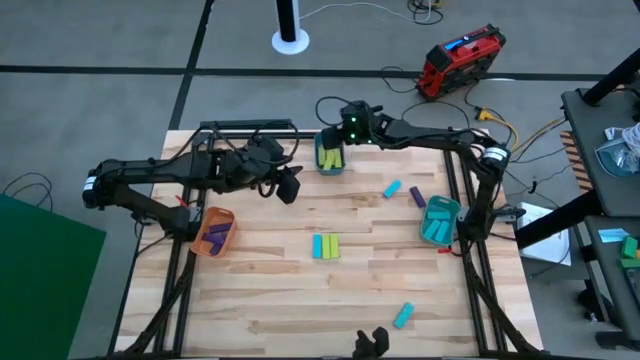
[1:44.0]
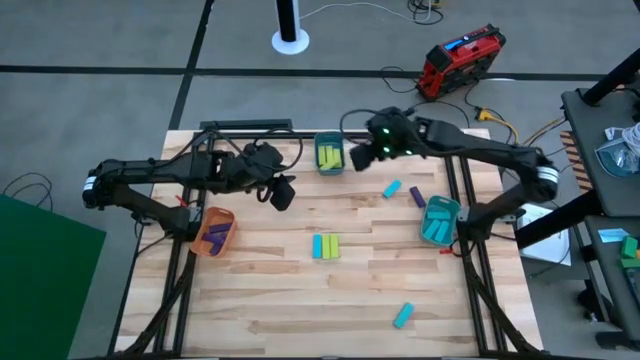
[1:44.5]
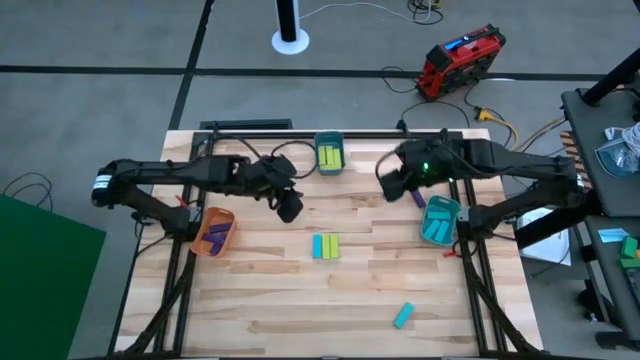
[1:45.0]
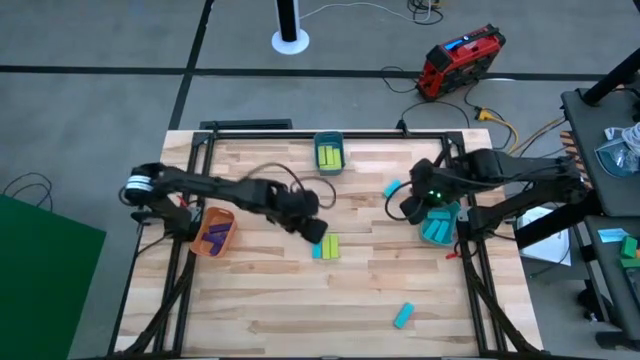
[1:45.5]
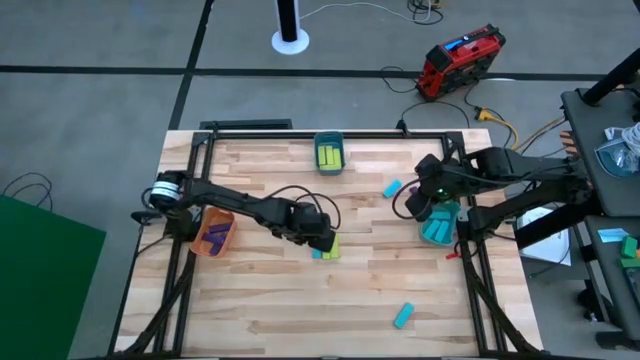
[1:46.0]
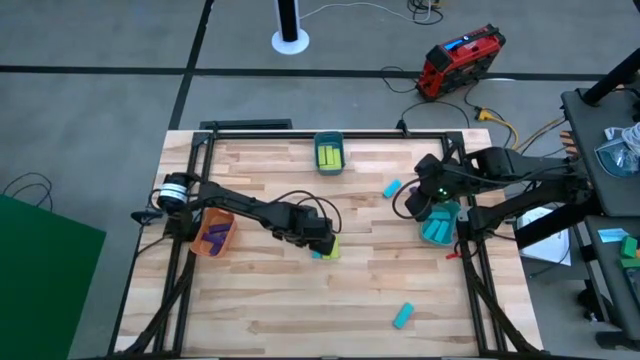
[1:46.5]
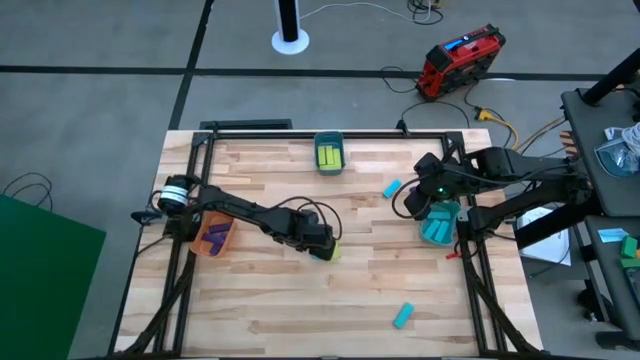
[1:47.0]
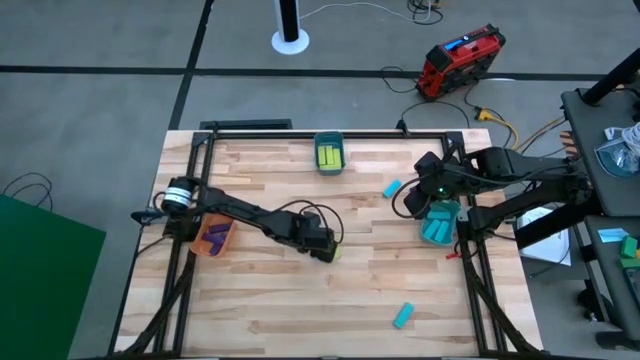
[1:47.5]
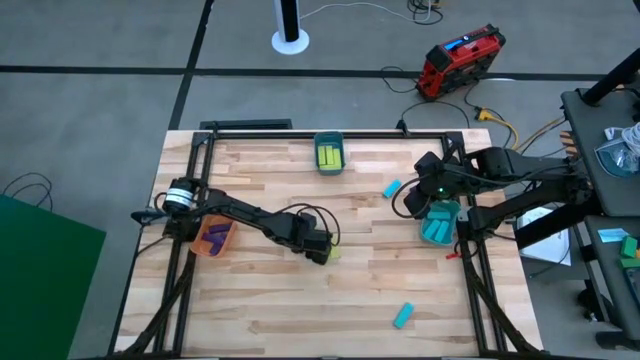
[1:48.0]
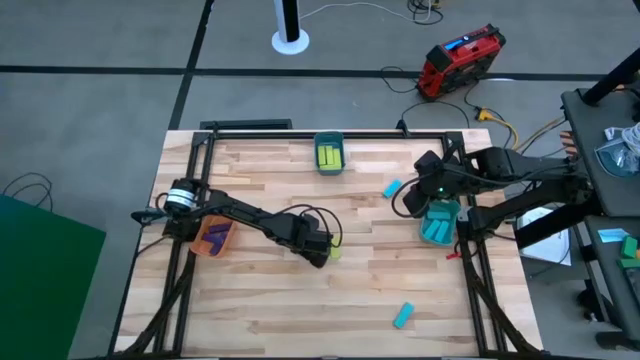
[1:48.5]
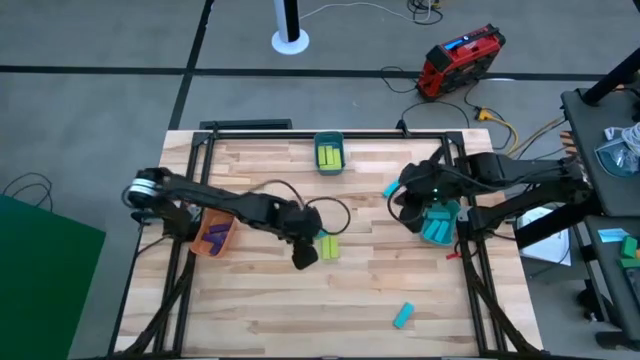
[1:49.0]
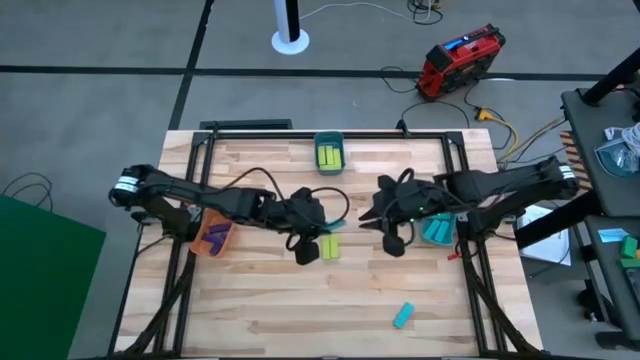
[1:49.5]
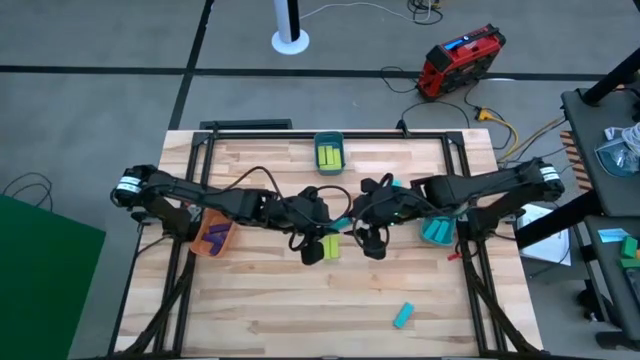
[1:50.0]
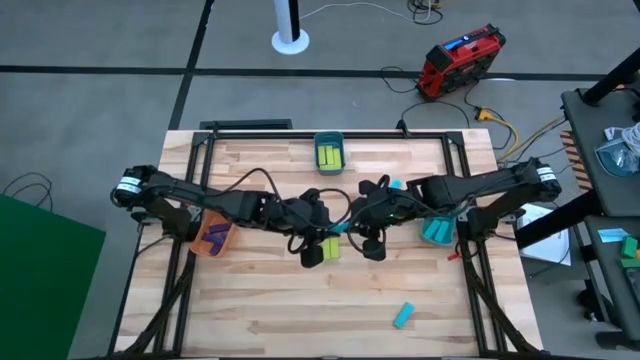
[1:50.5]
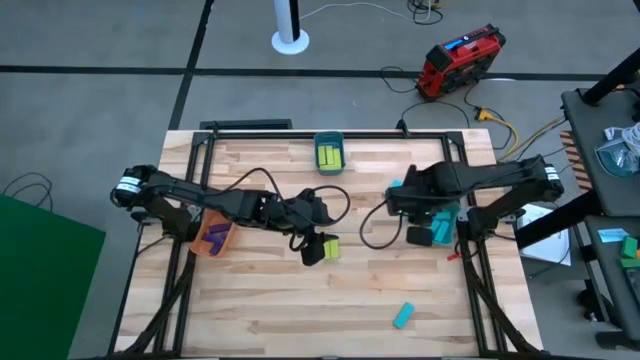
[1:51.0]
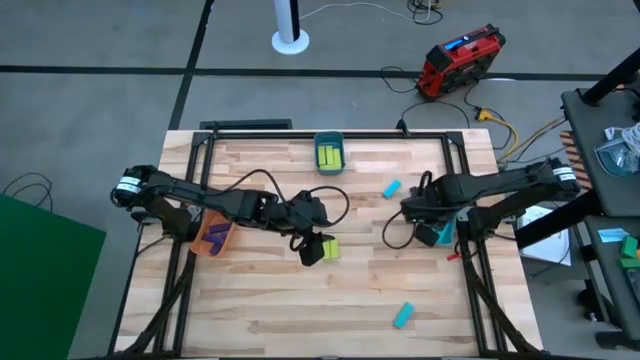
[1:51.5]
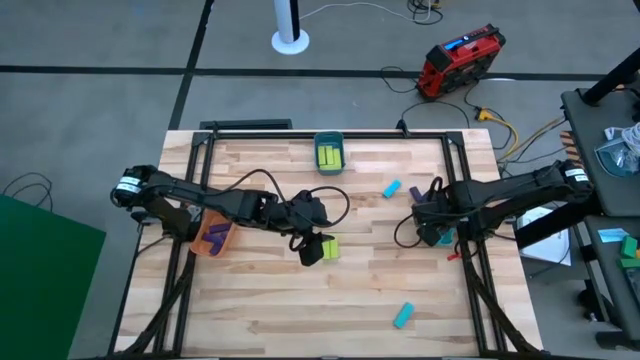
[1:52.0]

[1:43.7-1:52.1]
Task: Sort blocks
Put the blue block into the light blue bin

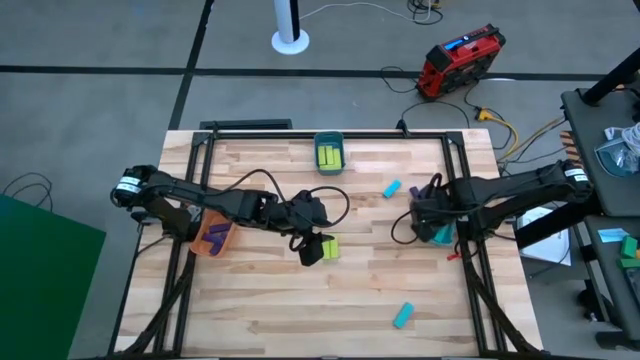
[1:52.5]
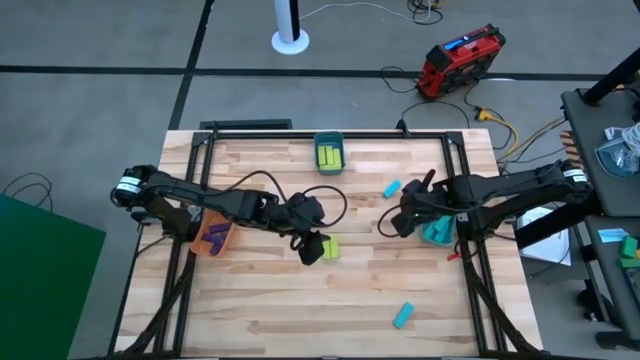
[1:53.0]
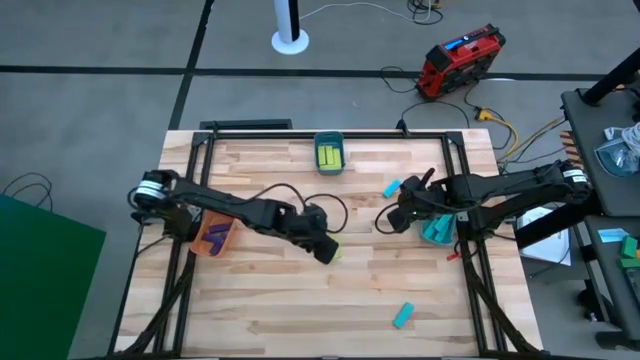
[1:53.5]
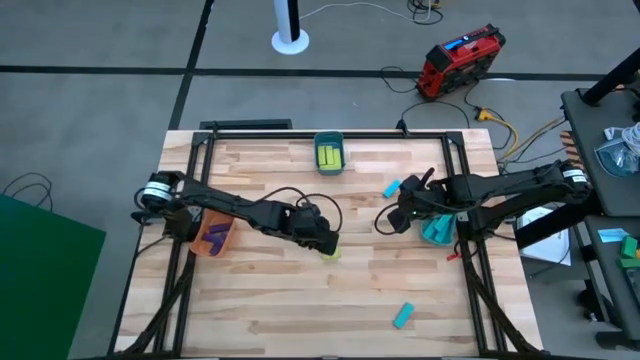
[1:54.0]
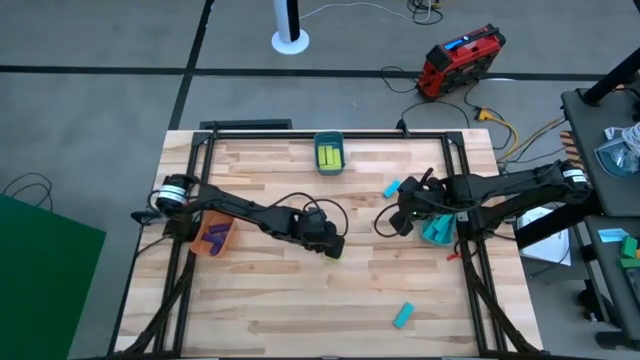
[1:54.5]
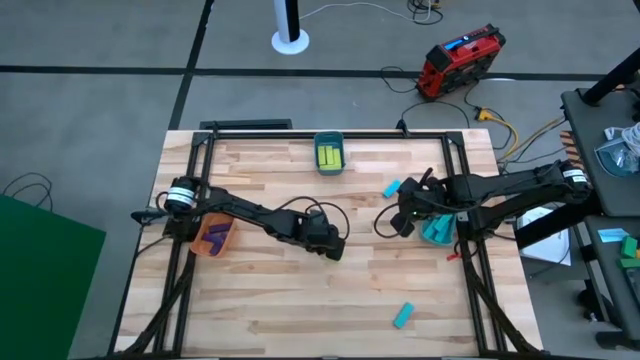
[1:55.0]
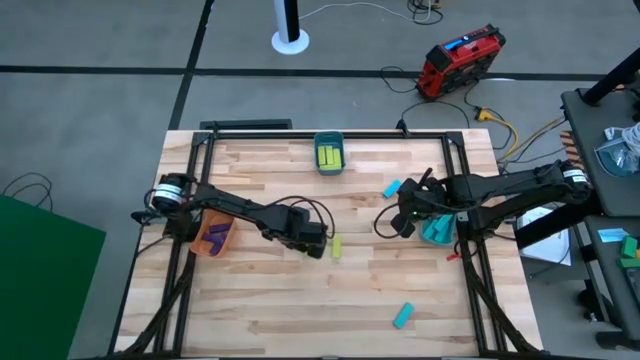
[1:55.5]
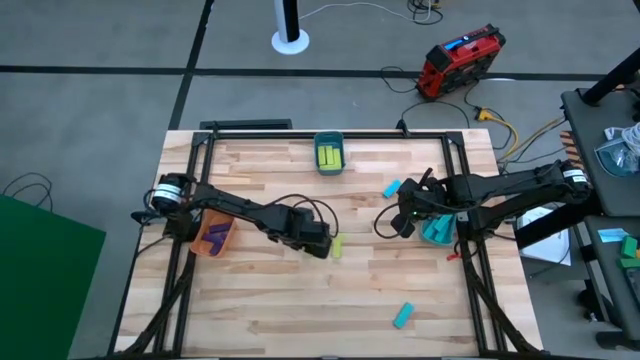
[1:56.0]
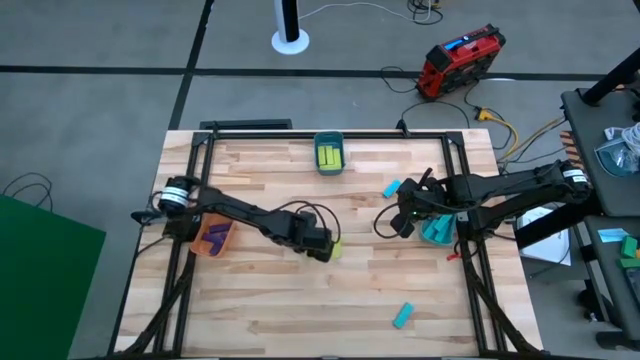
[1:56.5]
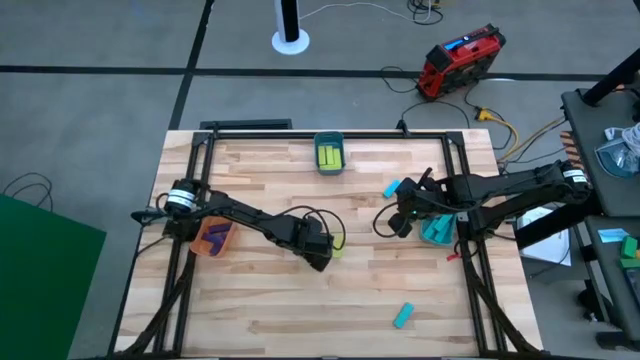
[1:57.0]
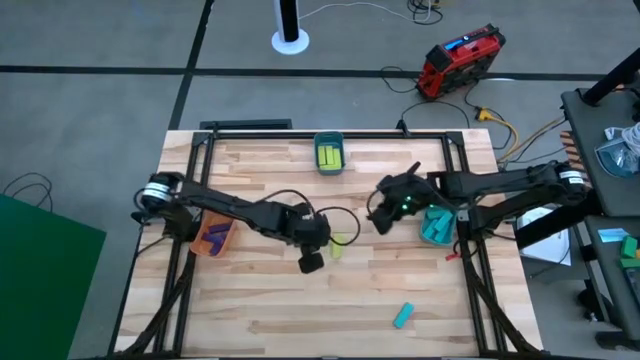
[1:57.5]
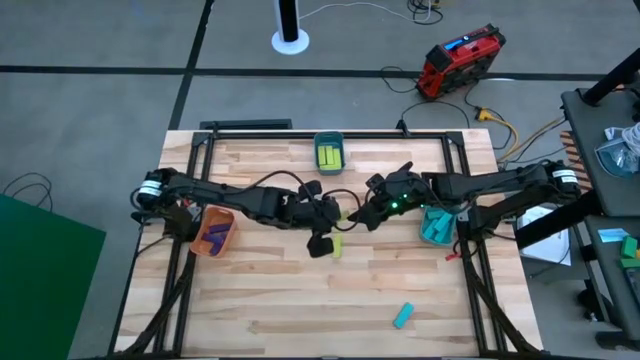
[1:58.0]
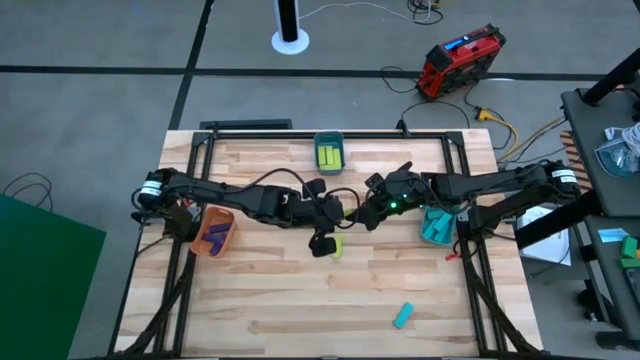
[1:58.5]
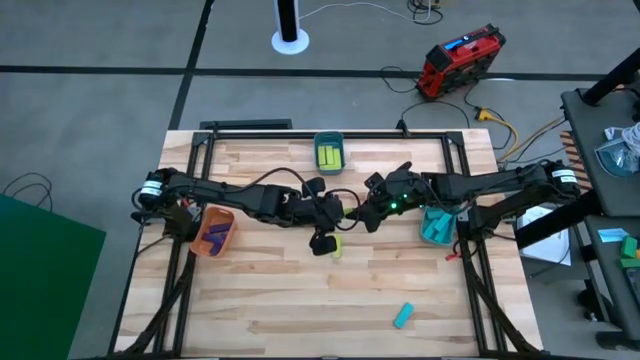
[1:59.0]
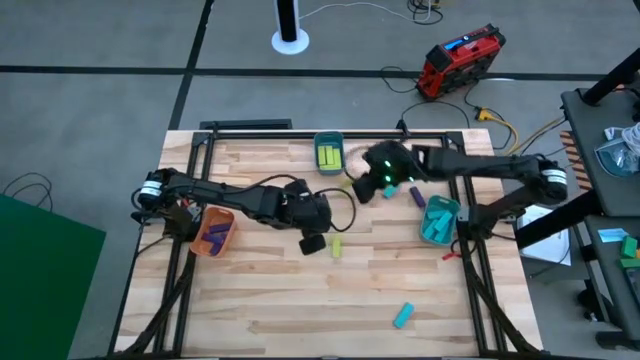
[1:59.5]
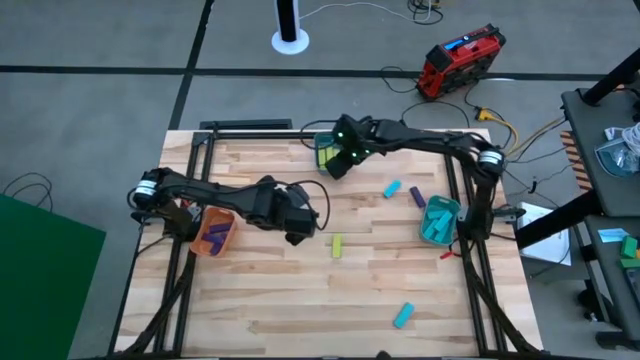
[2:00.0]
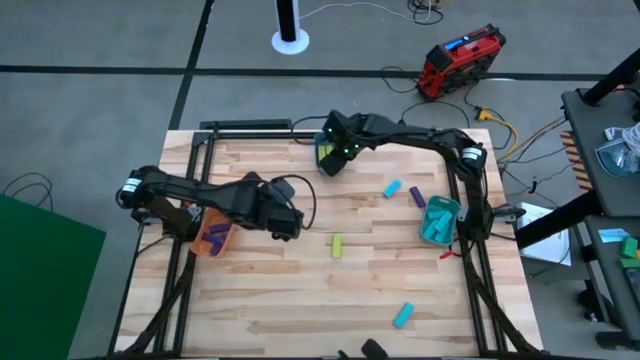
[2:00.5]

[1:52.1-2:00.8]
Put the green block into the blue bin

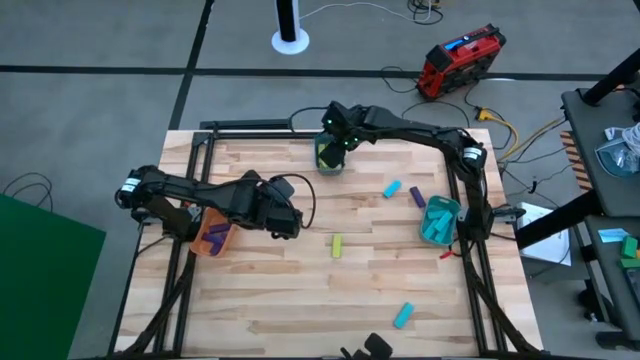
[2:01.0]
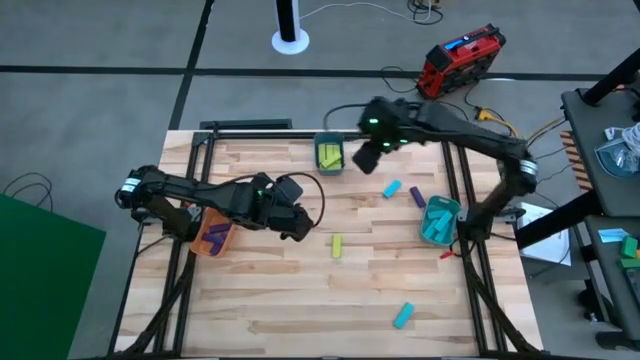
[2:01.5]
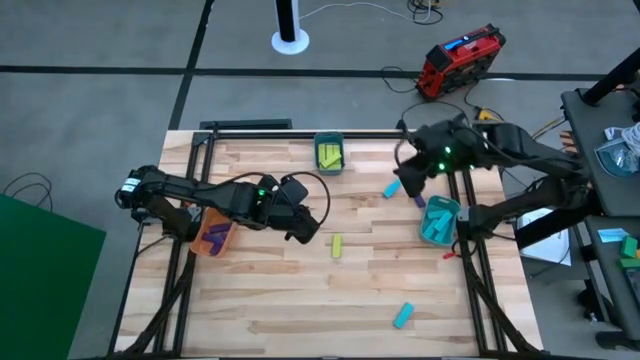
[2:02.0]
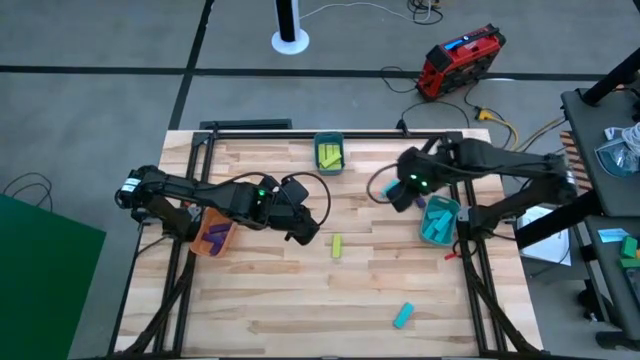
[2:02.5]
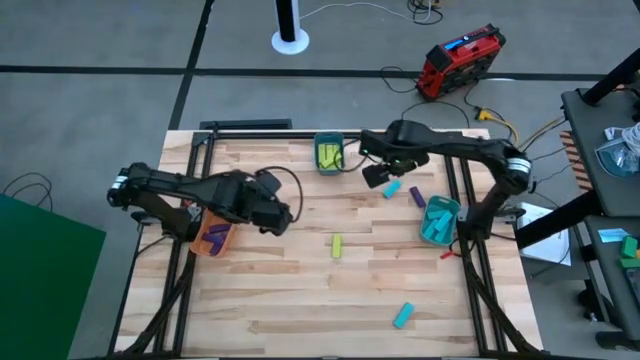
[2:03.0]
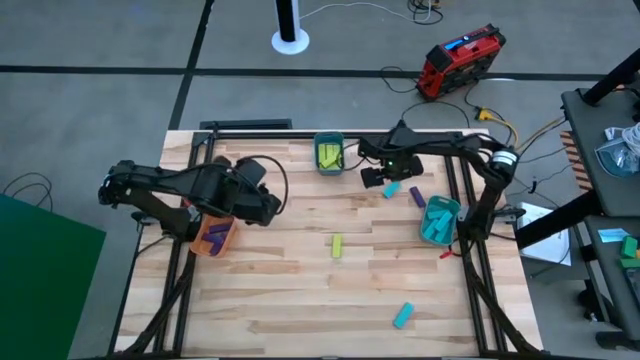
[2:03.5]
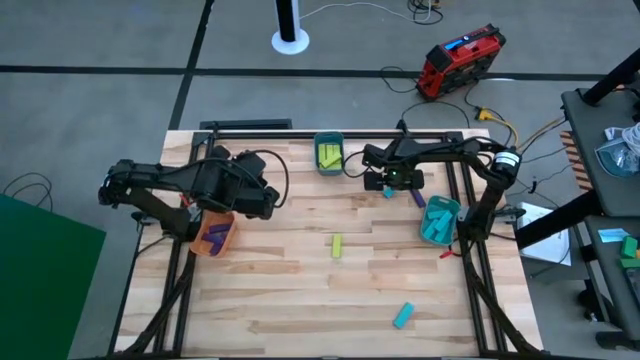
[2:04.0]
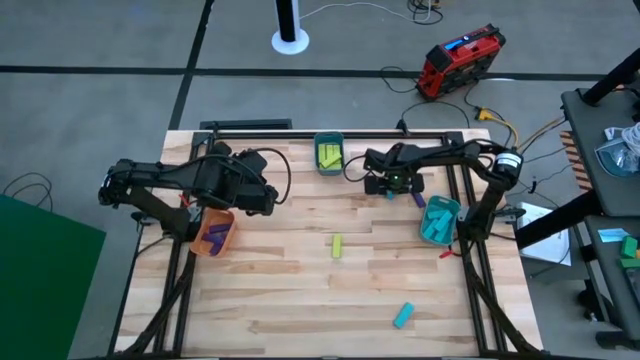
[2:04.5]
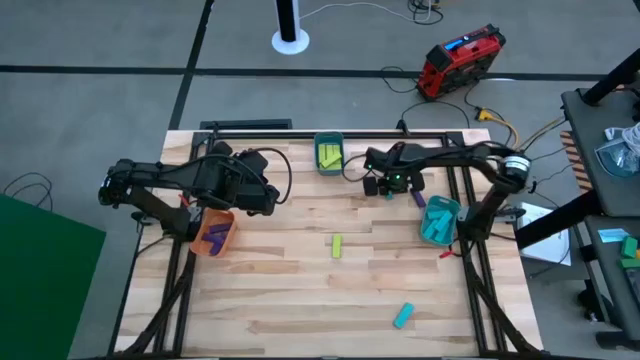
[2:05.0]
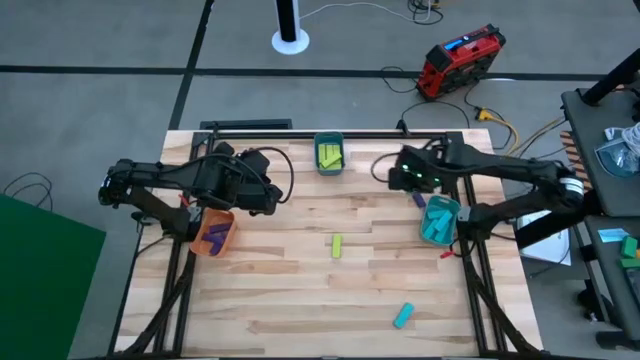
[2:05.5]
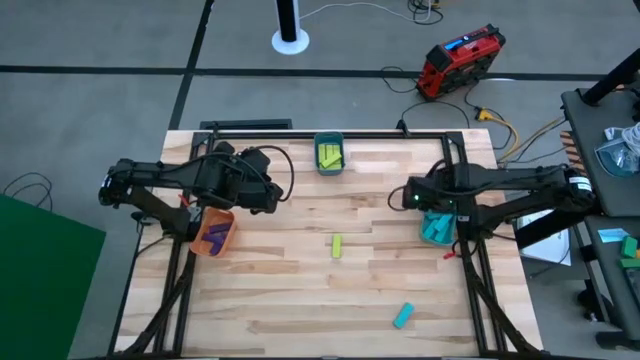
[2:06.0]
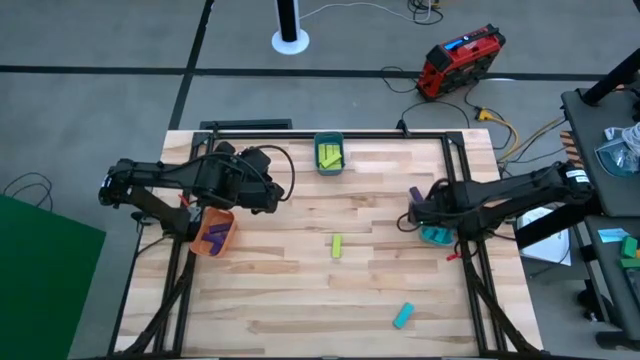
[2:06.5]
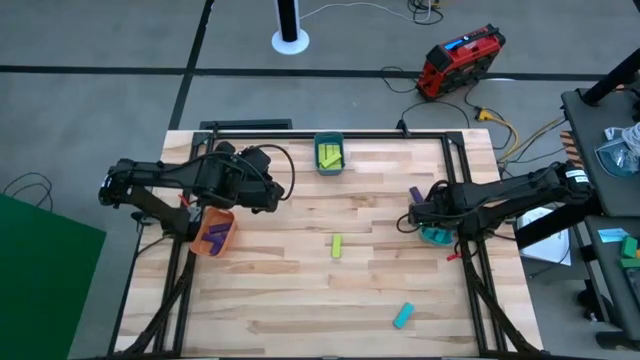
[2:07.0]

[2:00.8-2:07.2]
Put the blue block into the light blue bin
